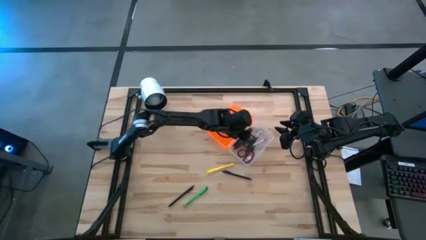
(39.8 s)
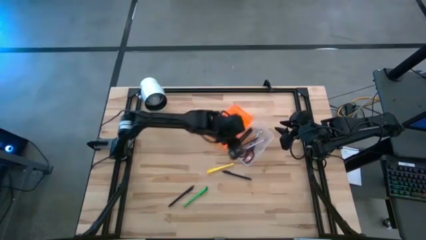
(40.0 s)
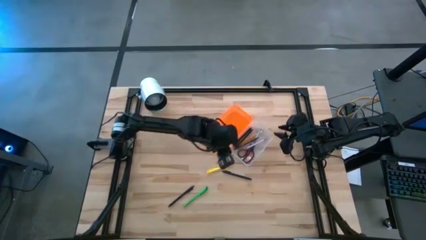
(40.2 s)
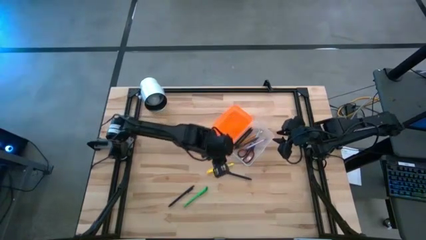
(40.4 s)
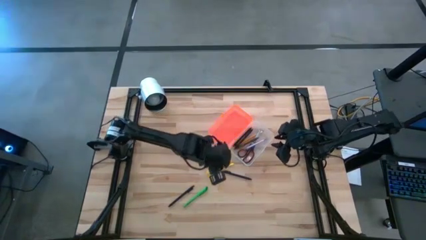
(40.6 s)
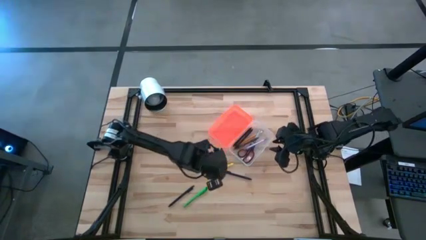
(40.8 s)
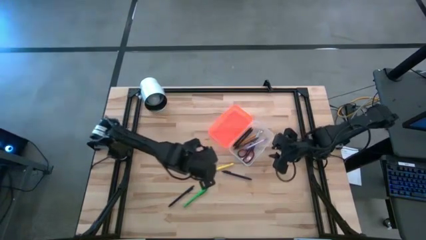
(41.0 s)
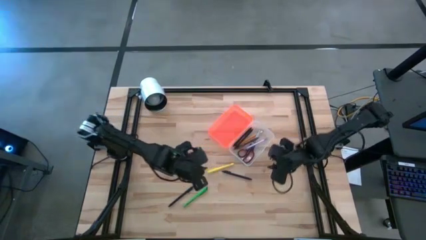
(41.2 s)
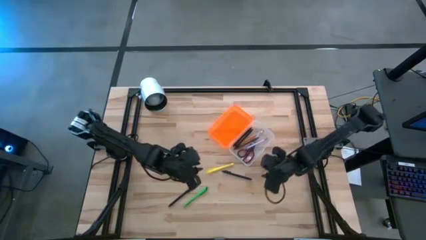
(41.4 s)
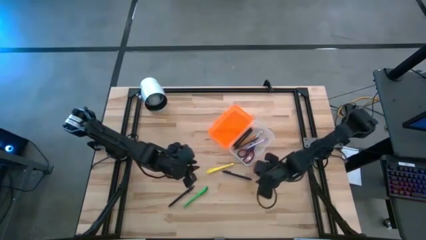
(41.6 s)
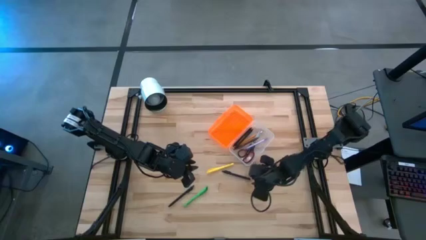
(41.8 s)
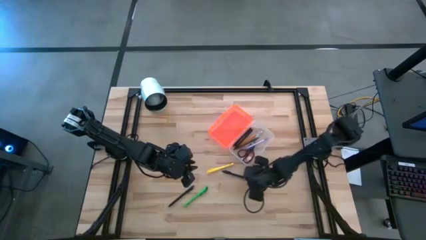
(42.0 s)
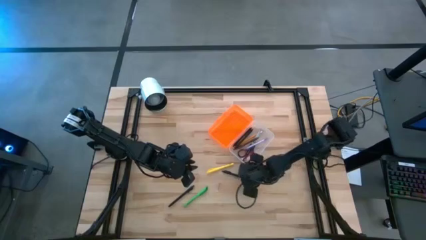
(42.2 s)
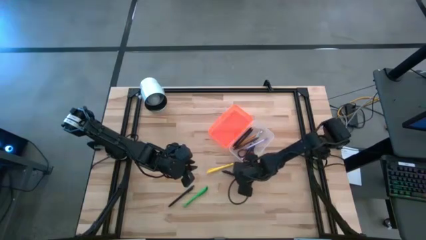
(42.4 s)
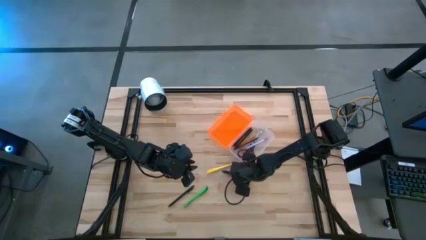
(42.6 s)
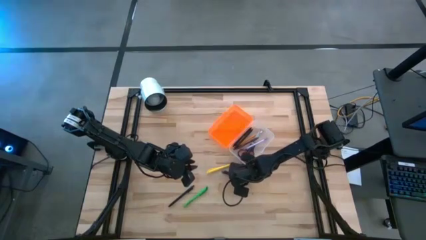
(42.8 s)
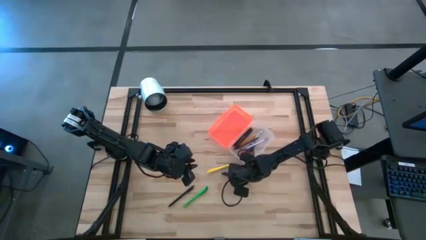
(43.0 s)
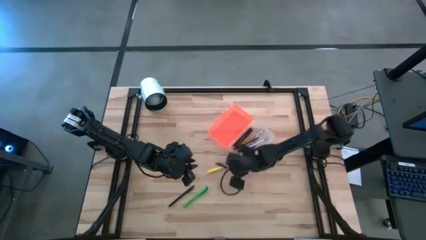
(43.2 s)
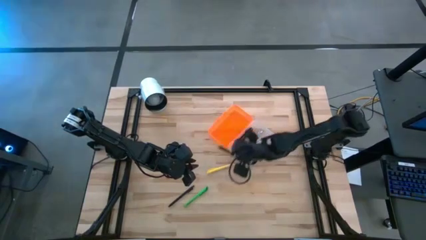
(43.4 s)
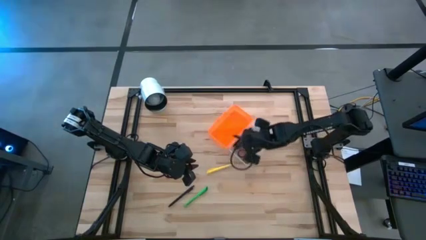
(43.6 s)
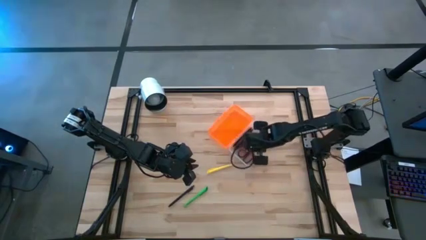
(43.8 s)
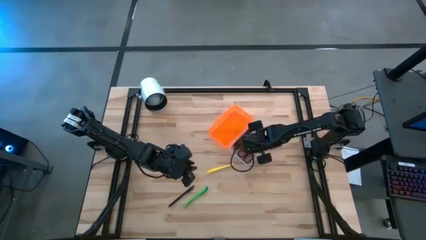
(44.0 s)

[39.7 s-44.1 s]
Task: Pick & place school supplies into a supply box
Put the black pen into the orange supply box

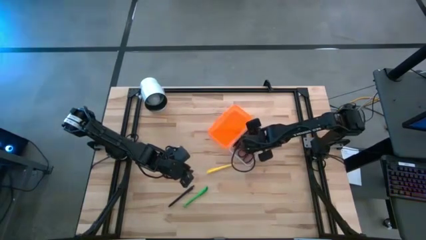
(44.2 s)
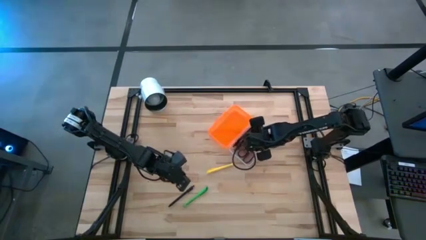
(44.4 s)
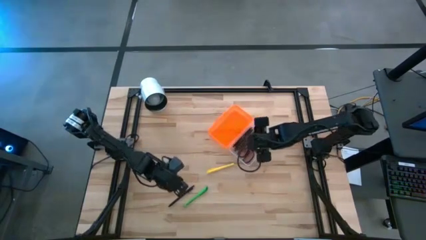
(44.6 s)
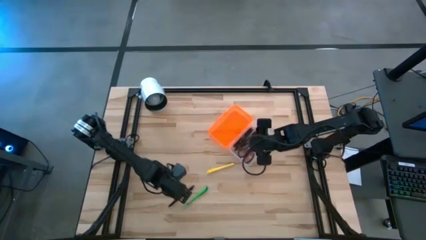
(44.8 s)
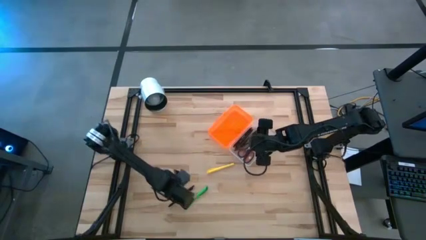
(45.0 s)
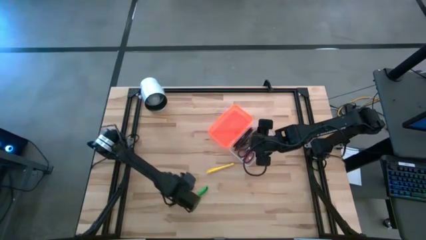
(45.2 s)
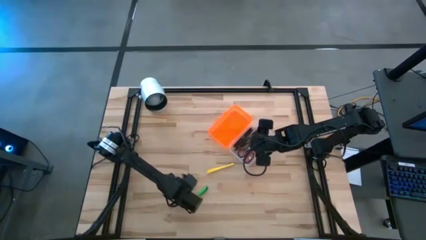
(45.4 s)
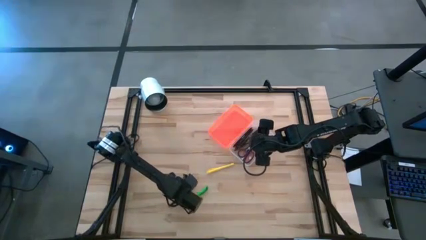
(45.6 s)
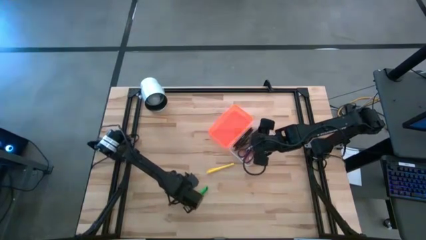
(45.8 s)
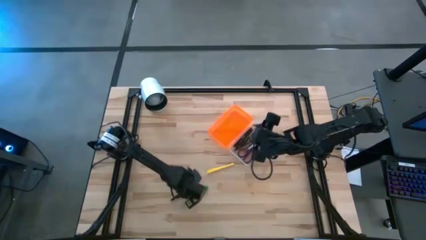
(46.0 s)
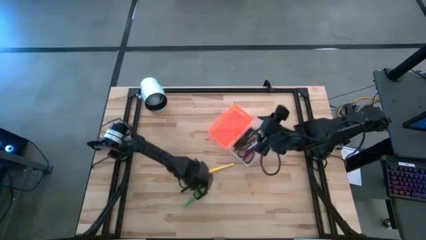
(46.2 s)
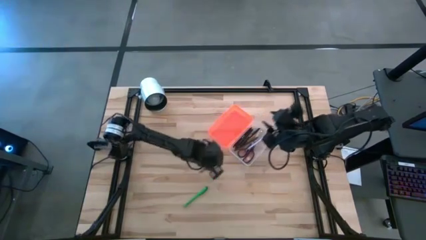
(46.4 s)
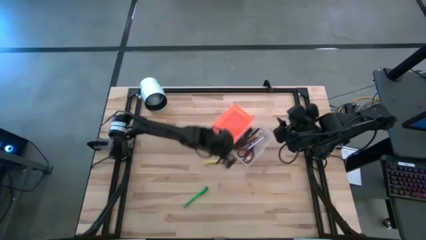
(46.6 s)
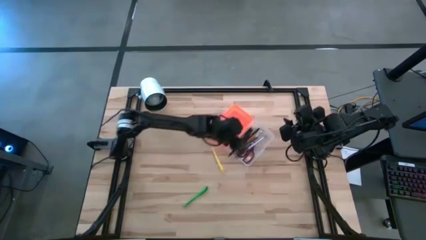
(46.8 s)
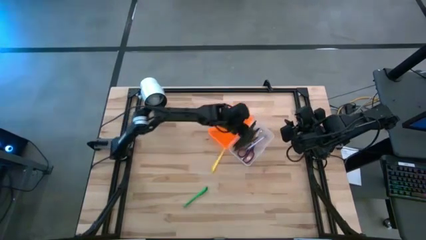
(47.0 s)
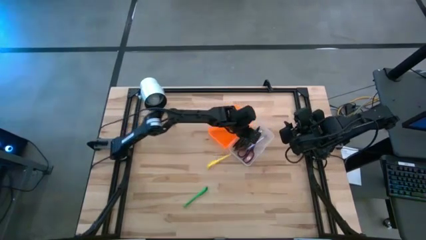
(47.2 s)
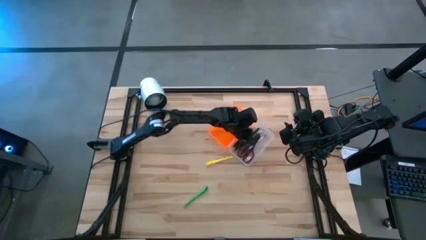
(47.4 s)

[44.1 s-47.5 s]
Put the black pen into the orange supply box

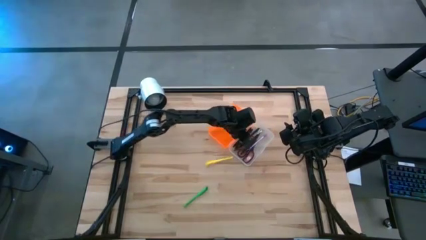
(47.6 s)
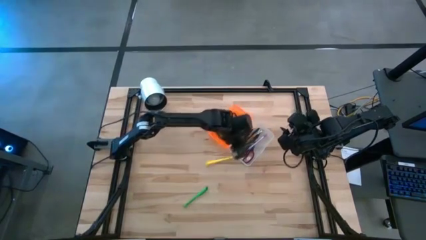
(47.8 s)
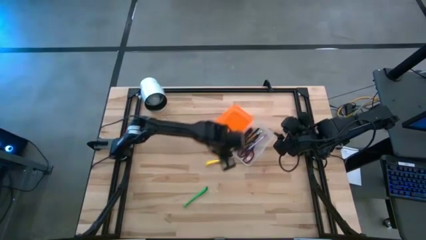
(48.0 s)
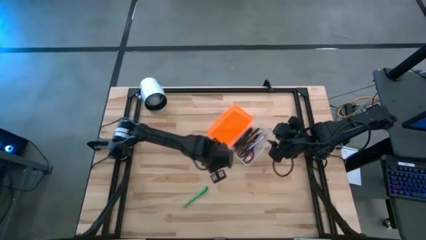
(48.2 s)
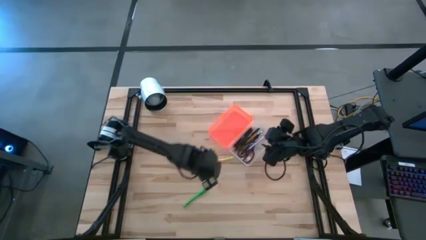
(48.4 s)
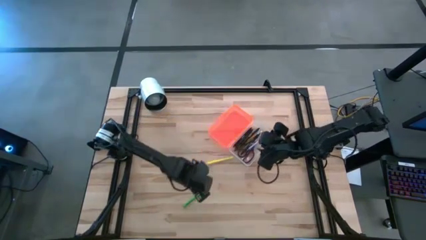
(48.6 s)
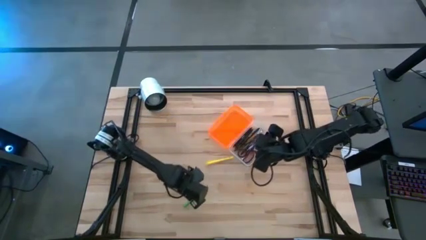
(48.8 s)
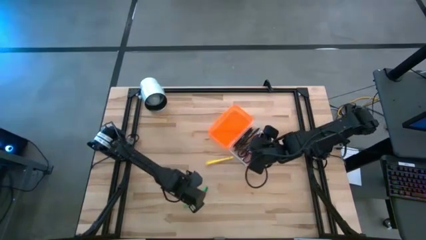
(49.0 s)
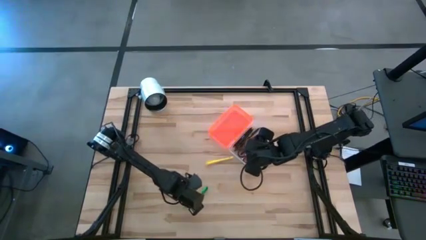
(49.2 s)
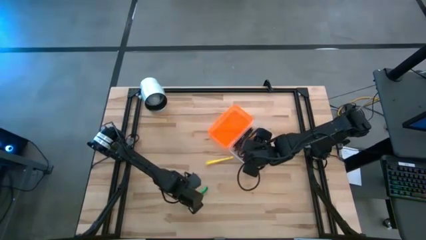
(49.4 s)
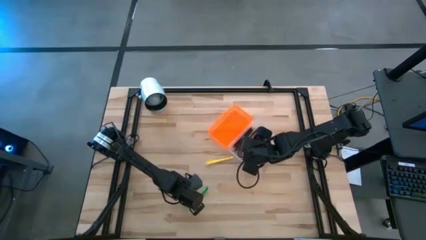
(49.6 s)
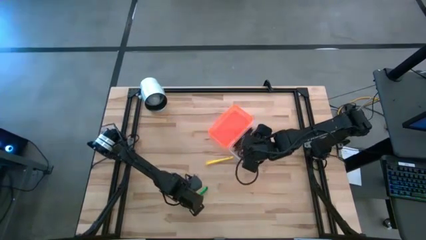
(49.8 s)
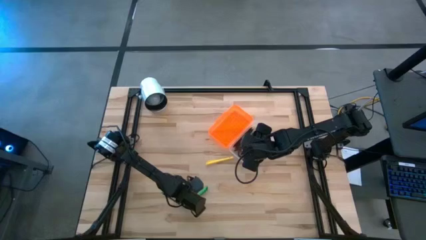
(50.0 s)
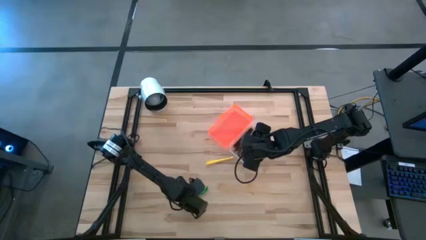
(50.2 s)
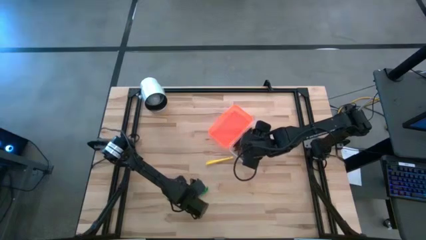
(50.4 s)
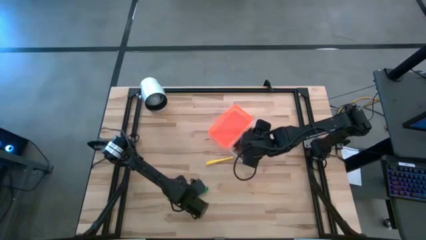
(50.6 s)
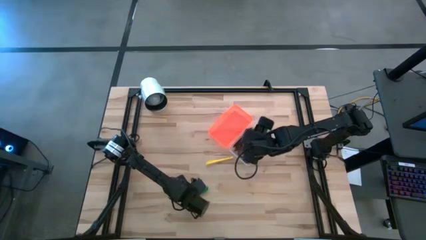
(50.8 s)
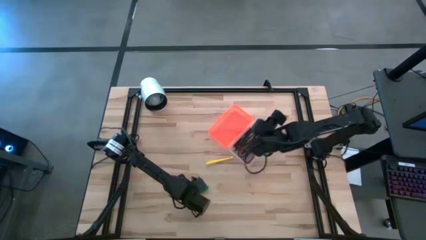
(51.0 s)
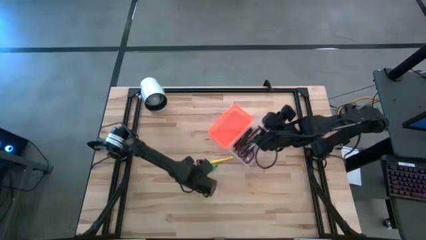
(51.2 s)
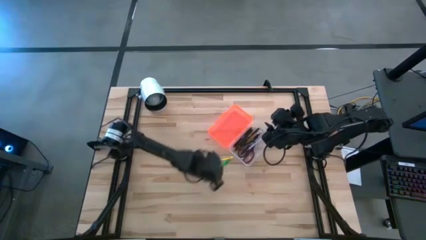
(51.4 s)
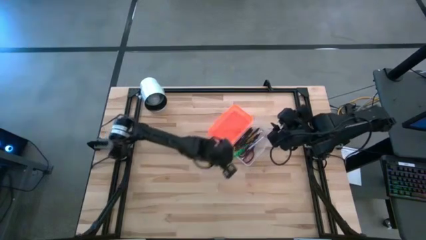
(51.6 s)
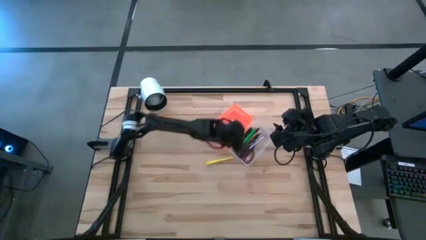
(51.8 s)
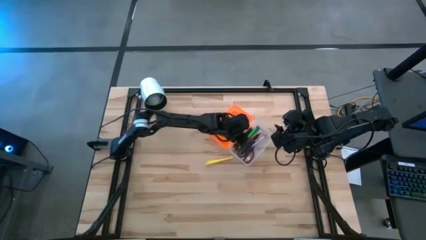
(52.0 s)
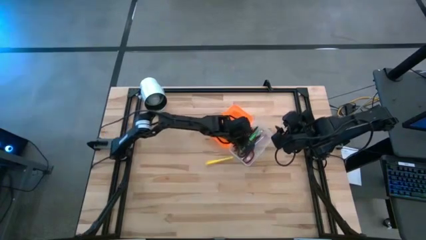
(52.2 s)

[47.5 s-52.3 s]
Put the green pen into the orange supply box

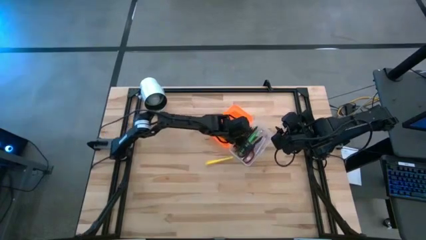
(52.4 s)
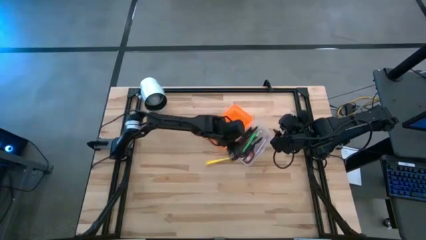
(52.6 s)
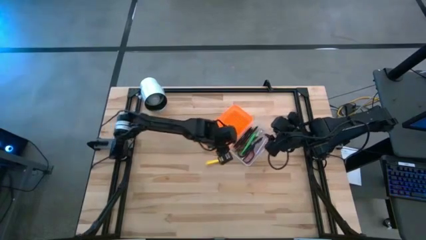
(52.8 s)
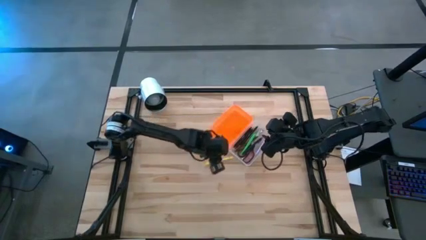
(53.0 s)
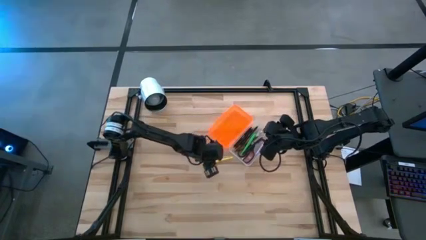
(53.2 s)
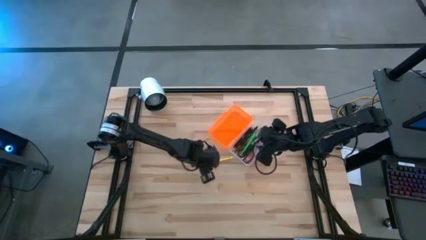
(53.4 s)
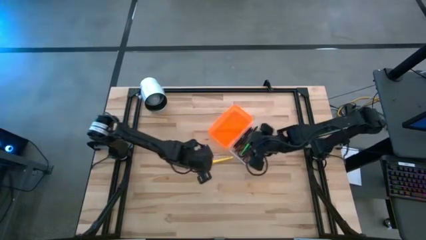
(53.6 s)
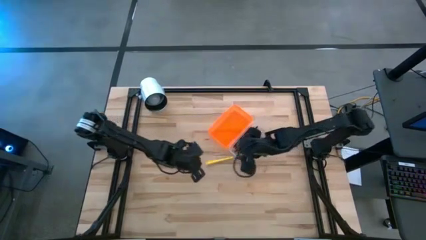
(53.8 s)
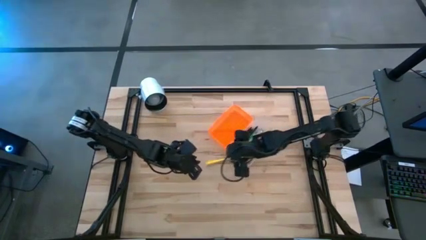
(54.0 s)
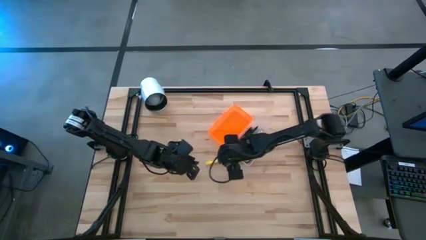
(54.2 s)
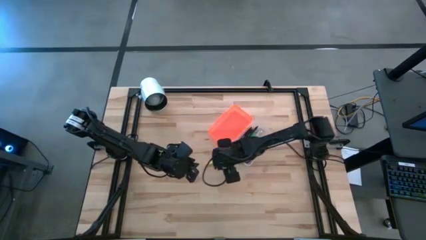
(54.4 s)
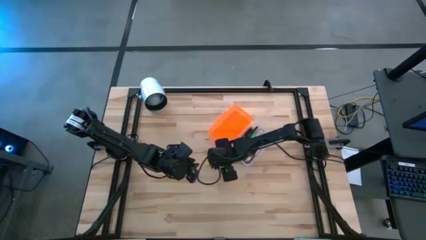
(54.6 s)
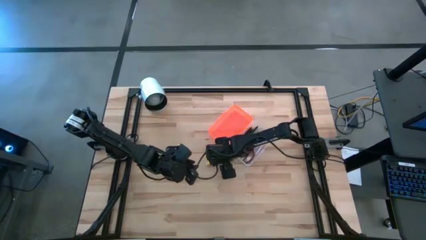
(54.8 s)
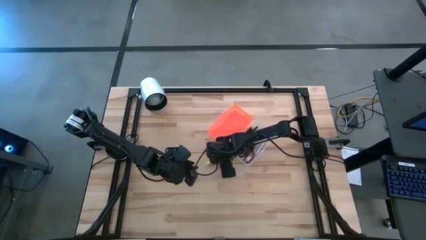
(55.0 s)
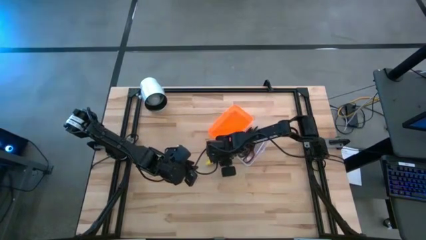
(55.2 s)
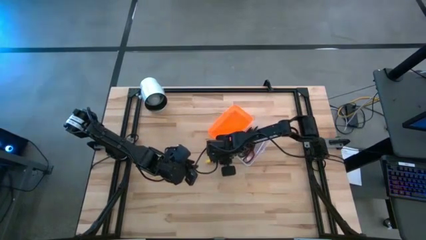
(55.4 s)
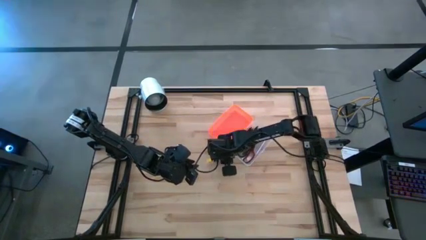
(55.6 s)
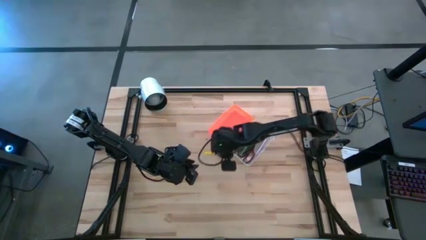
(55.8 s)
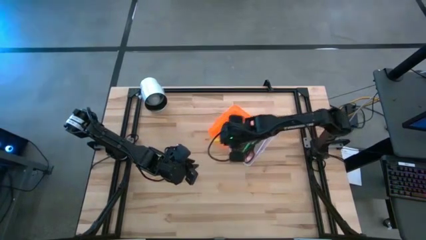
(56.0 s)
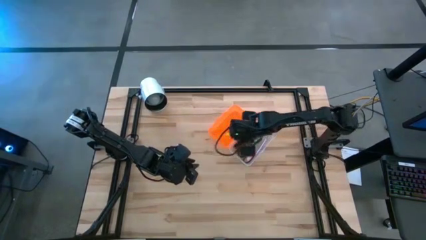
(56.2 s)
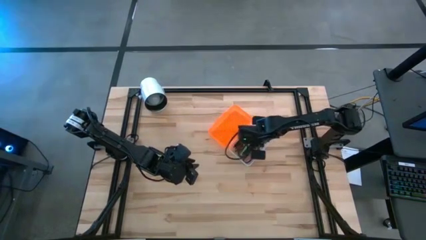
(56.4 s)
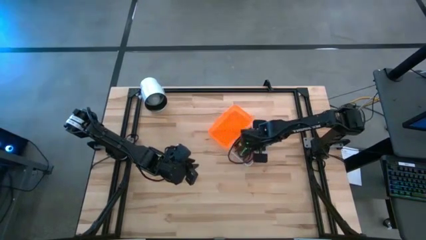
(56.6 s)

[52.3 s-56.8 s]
Put the yellow pen into the orange supply box
